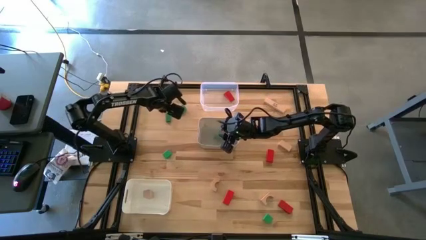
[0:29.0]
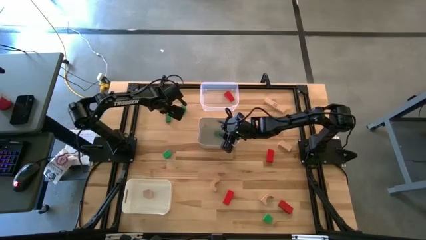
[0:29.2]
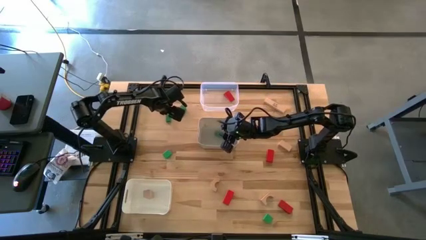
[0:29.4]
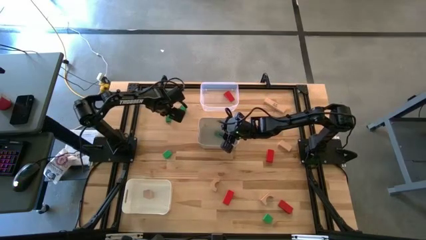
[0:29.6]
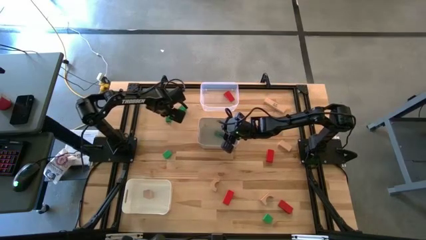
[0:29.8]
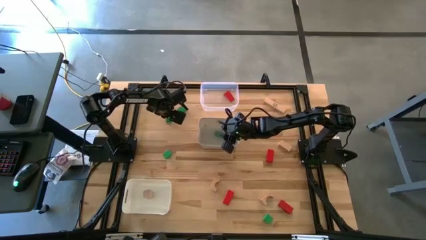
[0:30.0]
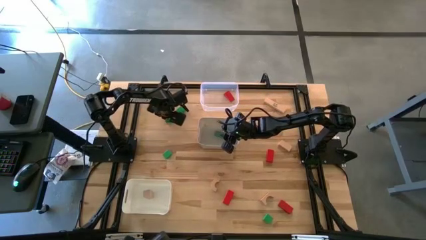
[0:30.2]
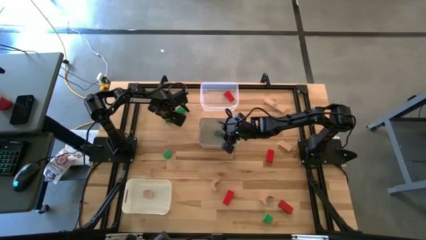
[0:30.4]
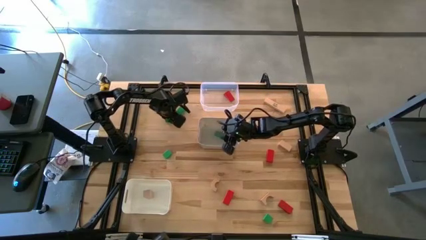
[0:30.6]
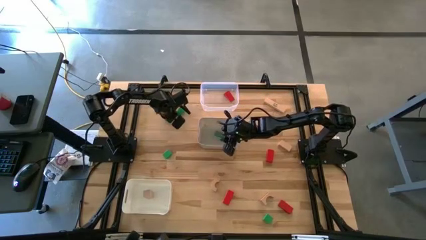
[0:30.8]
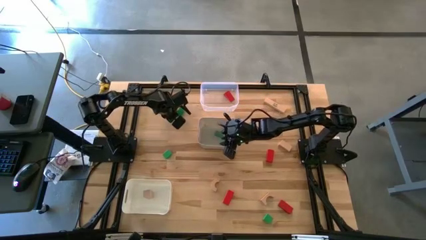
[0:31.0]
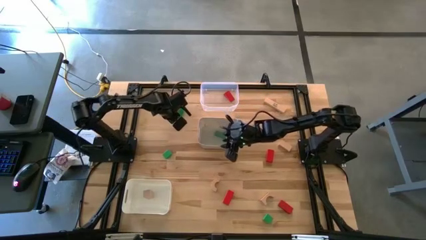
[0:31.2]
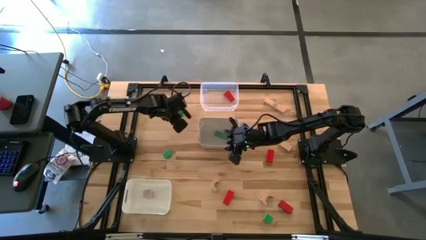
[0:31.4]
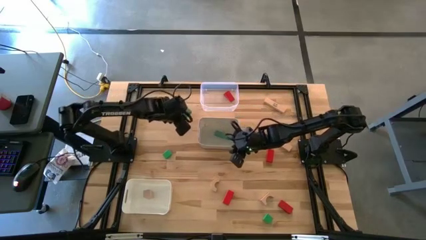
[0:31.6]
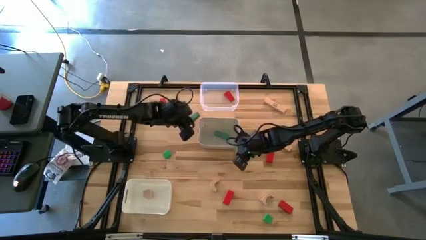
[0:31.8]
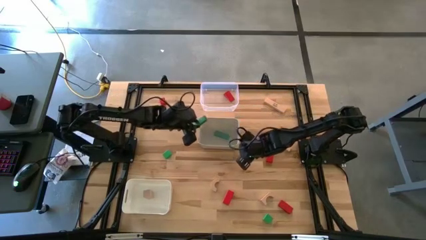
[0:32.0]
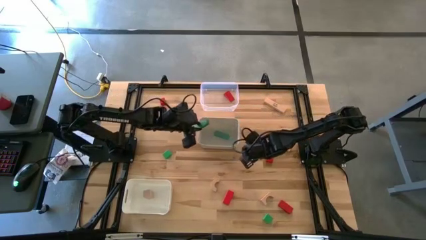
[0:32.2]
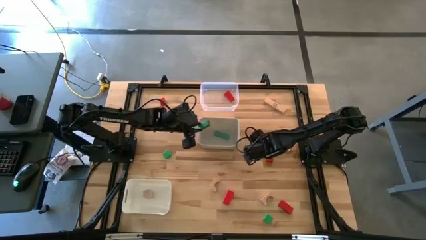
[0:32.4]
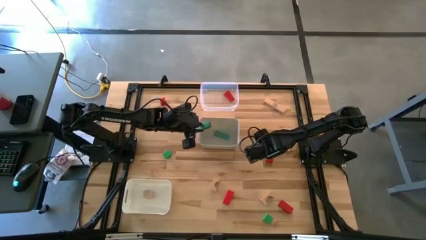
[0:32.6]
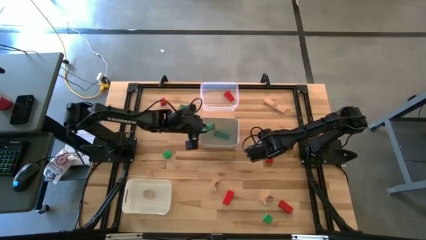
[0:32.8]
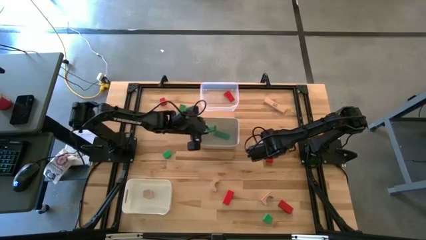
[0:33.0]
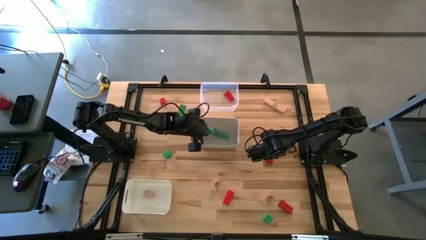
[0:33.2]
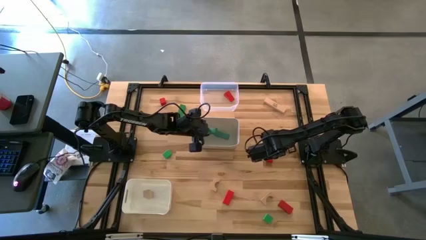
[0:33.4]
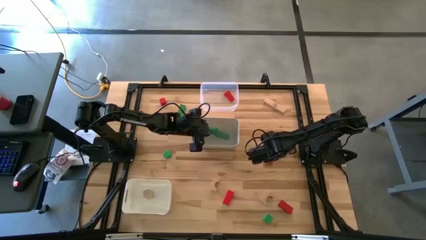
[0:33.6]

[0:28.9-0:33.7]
Task: Sort & place blocks by color
Put the left green rectangular block into the top white bin

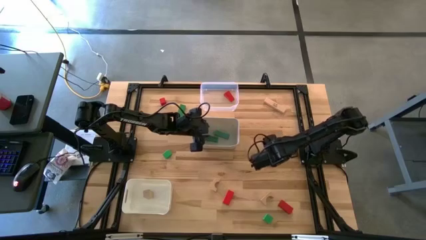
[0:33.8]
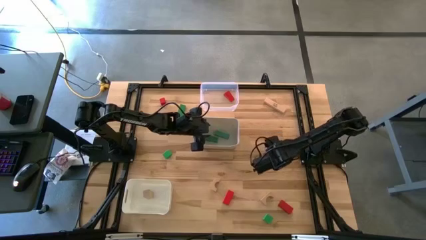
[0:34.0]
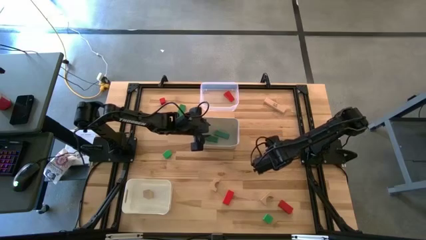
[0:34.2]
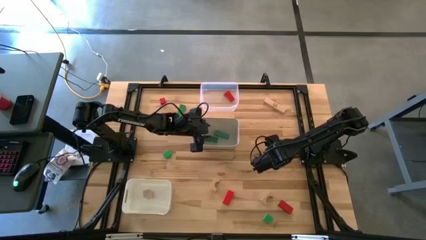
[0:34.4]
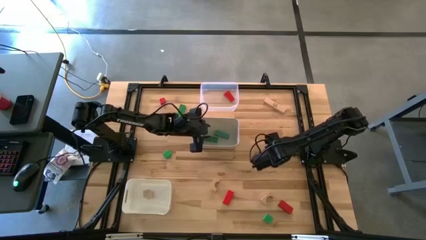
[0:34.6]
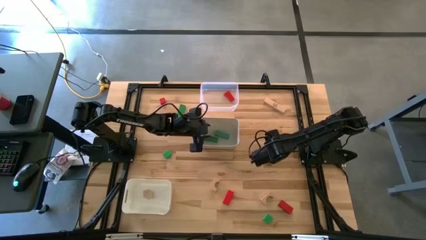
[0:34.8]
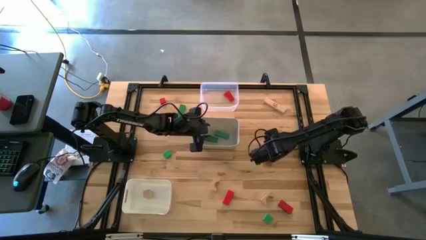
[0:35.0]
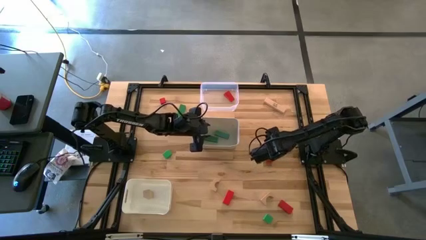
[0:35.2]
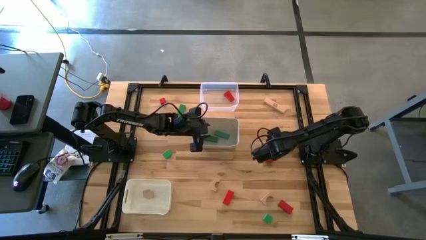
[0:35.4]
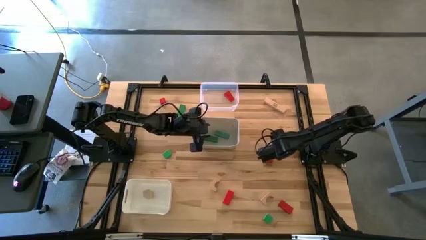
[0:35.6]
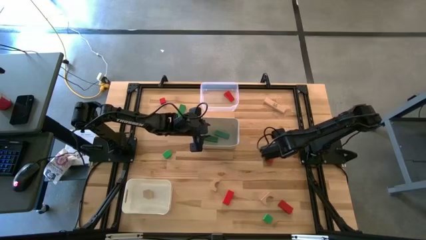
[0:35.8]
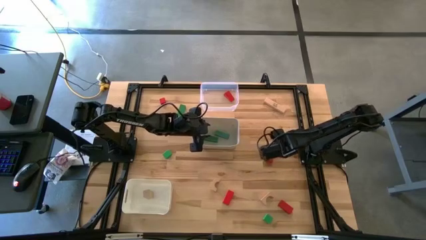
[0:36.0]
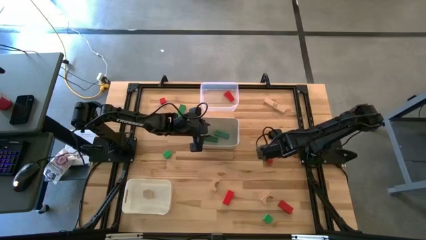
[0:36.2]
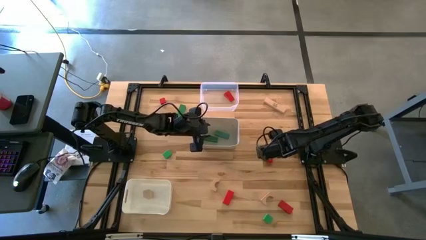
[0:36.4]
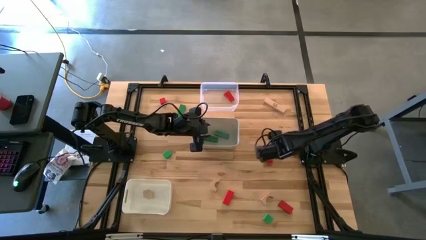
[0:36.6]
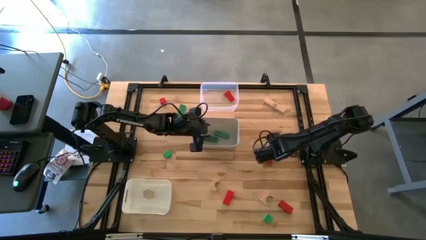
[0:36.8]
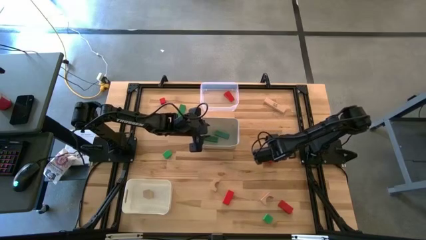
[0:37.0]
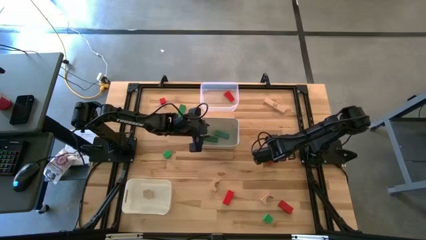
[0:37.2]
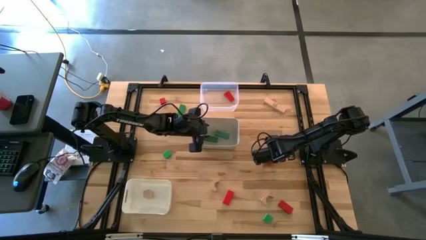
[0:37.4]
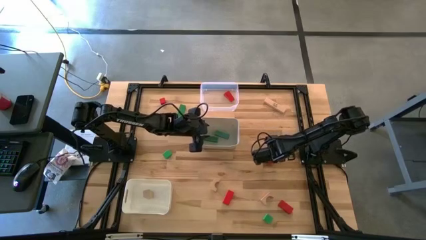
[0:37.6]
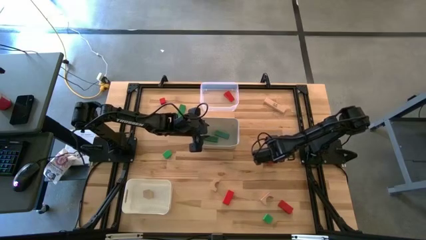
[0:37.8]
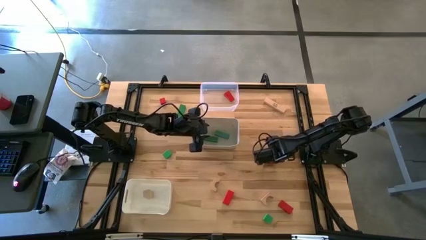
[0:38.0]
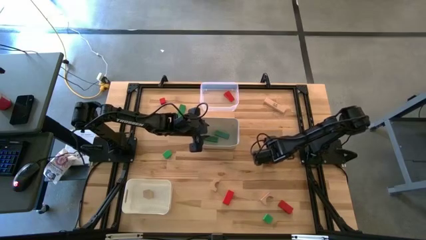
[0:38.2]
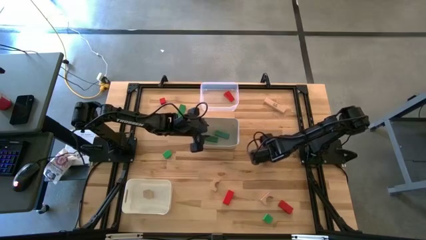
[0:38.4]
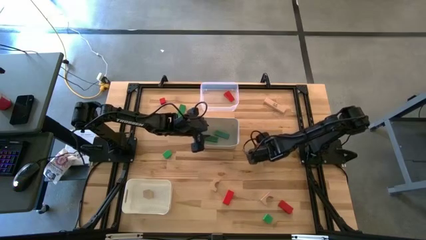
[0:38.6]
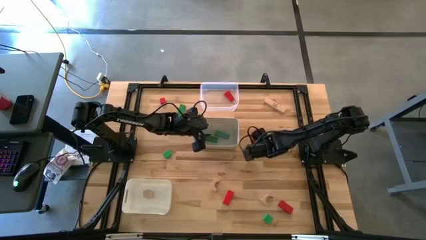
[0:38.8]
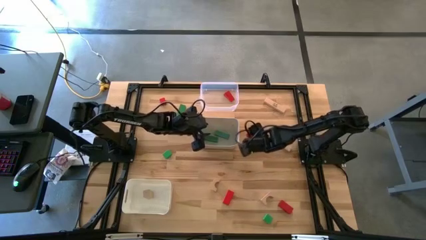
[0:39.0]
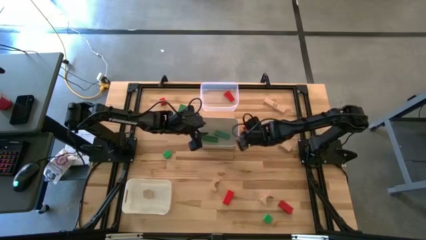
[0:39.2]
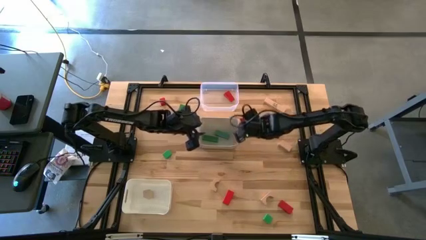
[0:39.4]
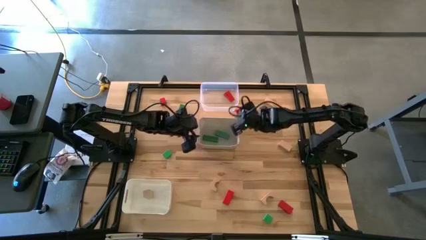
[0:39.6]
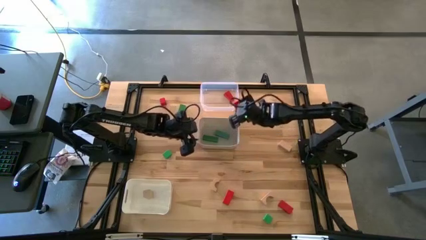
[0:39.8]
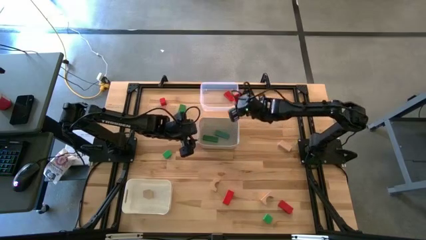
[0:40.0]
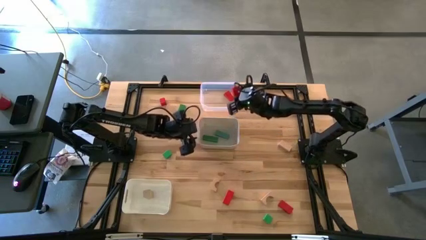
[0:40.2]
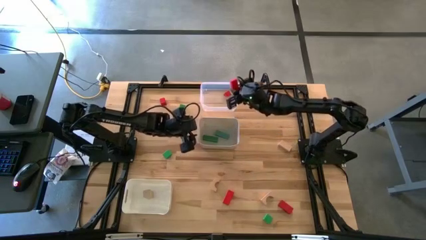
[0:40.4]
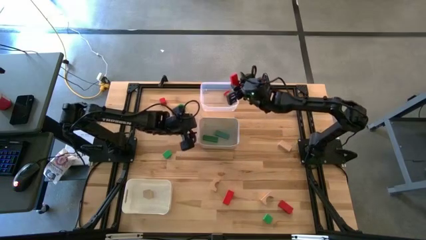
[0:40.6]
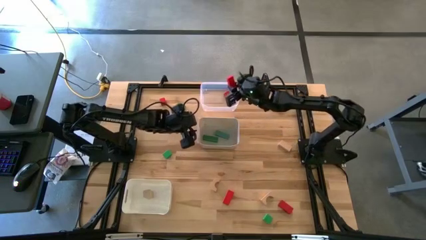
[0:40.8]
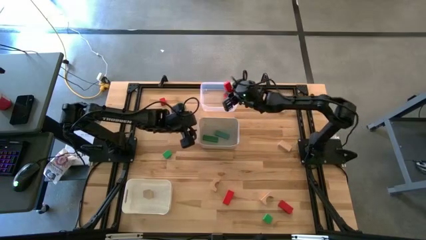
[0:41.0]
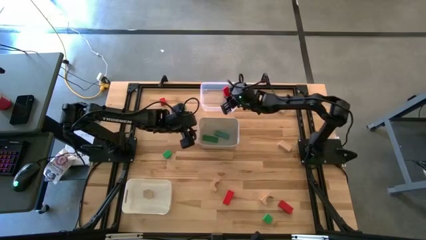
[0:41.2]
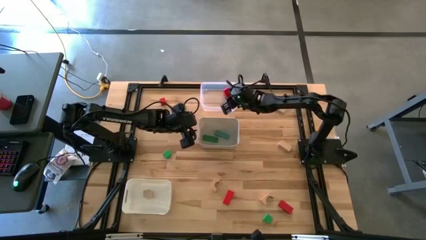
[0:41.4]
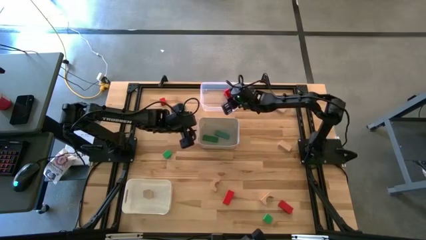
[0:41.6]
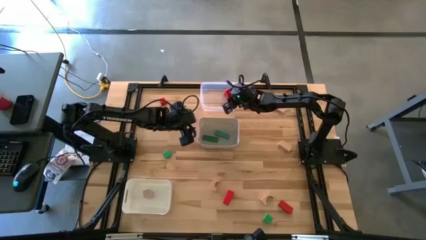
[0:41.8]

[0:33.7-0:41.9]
Put the top red rectangular block into the transparent bin

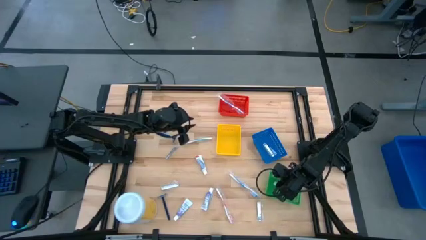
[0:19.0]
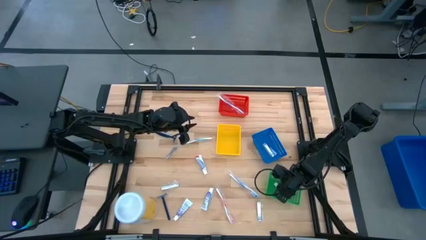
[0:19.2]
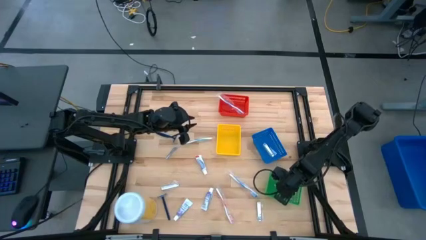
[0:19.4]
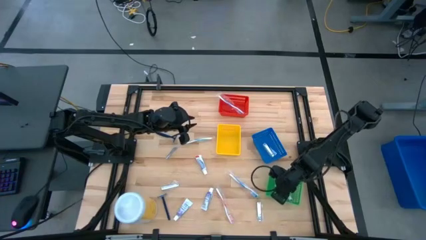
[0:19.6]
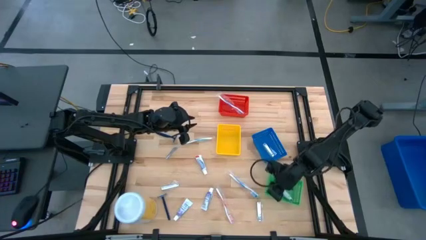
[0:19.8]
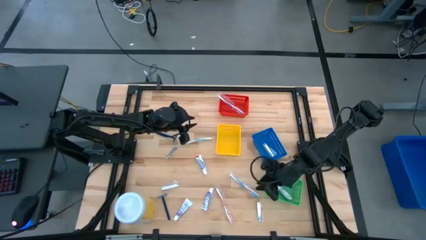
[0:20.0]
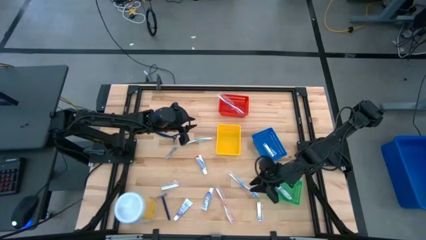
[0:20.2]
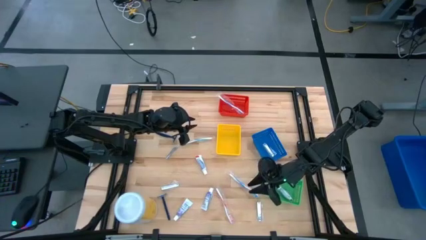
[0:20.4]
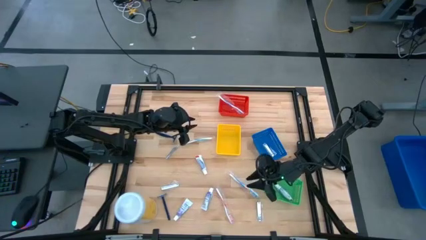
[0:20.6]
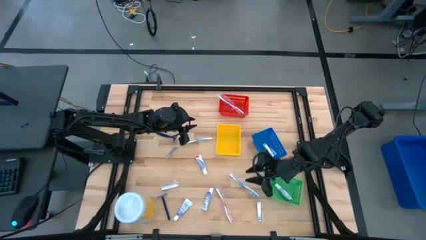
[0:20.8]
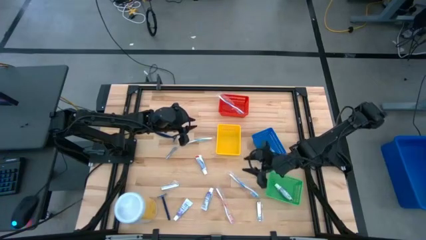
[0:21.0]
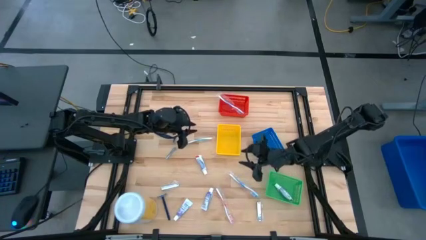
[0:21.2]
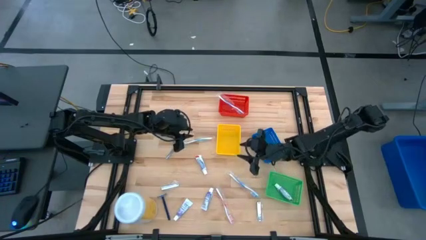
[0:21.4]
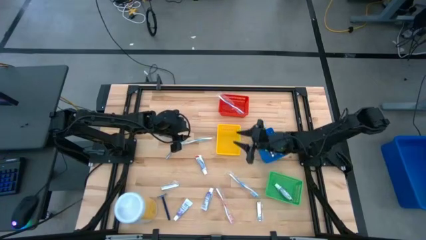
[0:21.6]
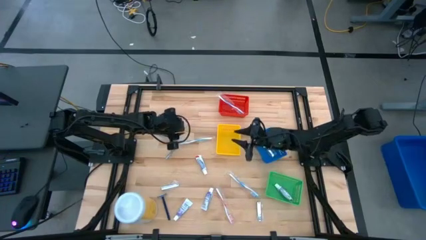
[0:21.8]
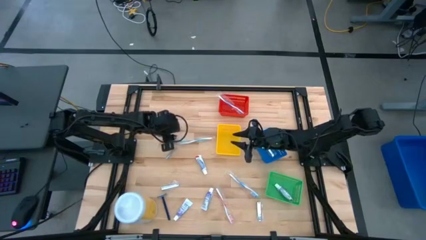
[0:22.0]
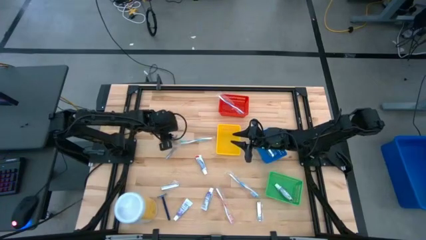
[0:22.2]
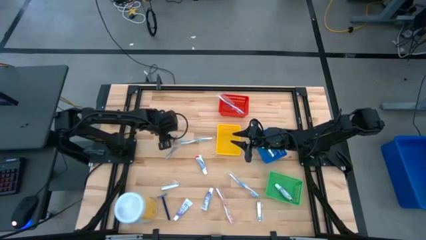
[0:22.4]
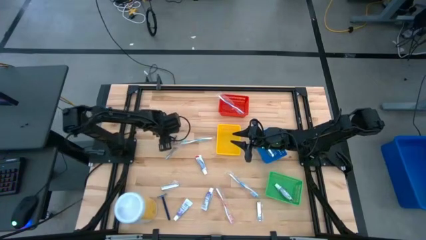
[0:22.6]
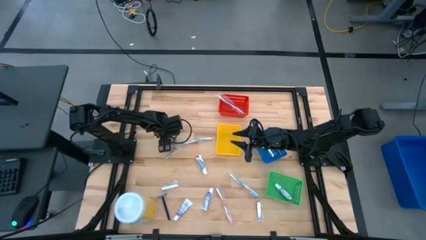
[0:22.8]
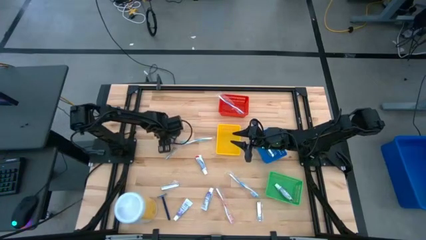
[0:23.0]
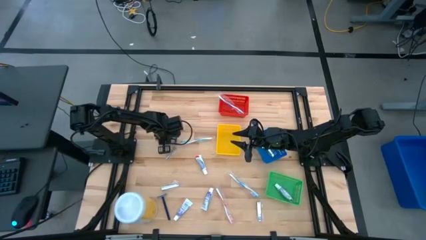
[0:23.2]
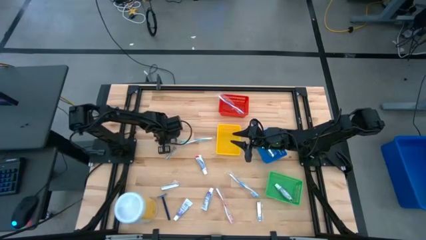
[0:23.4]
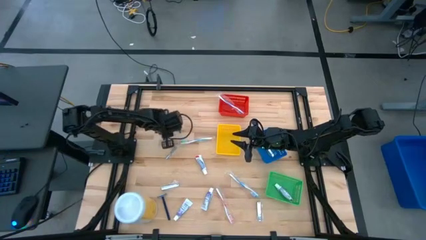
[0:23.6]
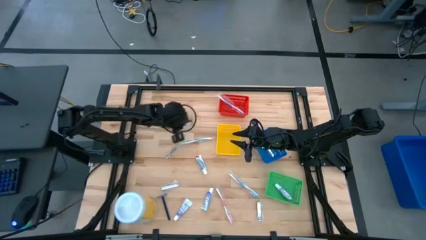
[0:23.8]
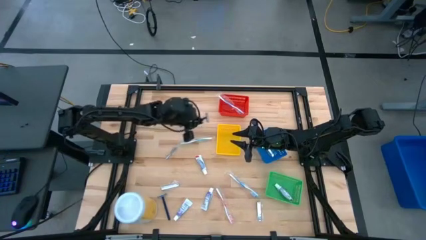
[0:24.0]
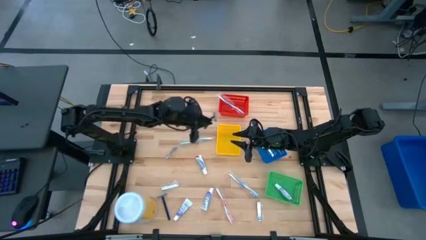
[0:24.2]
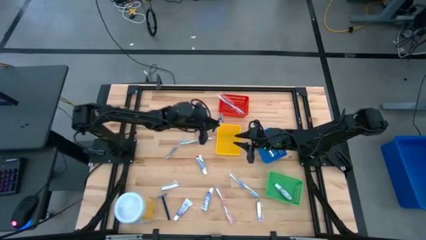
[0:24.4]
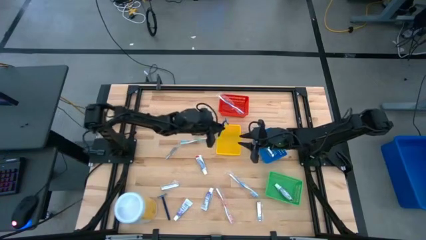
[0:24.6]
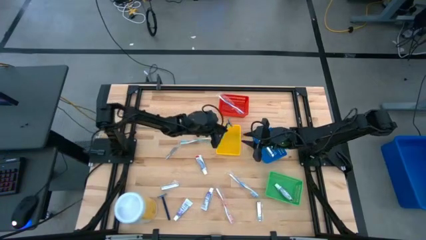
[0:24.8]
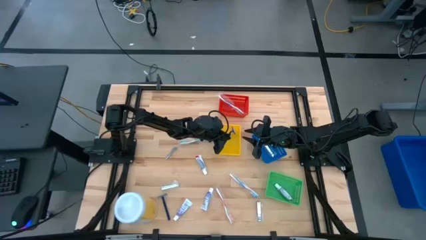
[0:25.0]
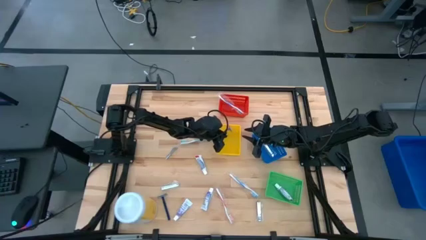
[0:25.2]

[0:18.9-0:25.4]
Task: Pick & Place Travel size toiletries
Put the hand shaver blade into the yellow bin
